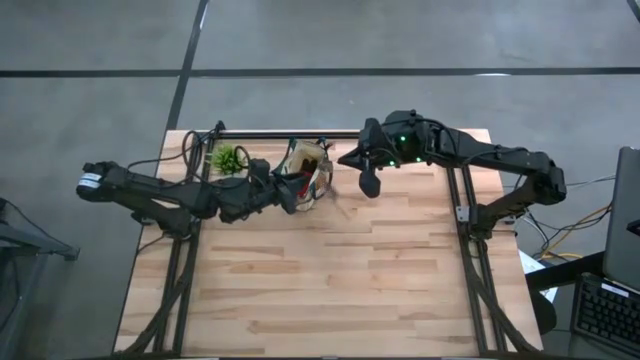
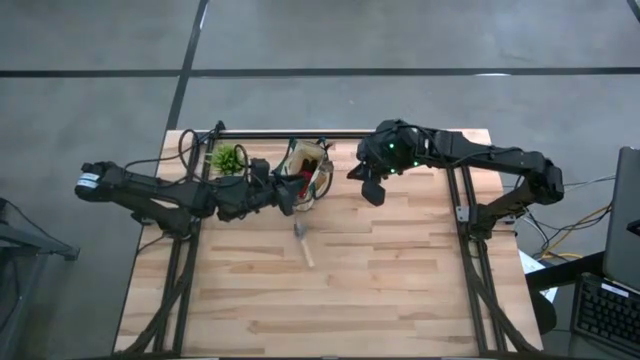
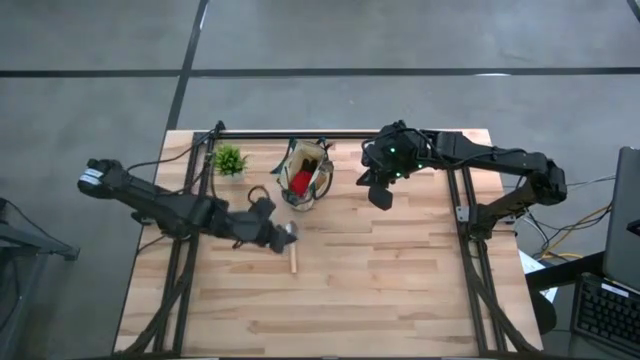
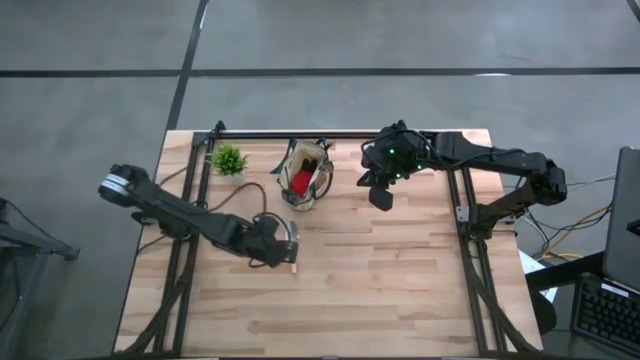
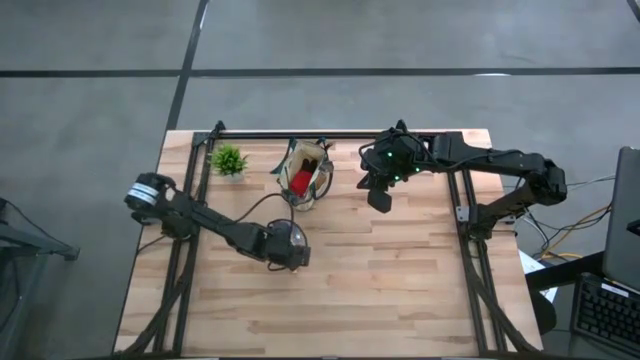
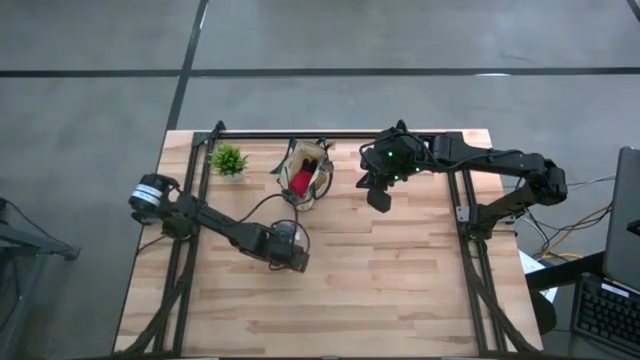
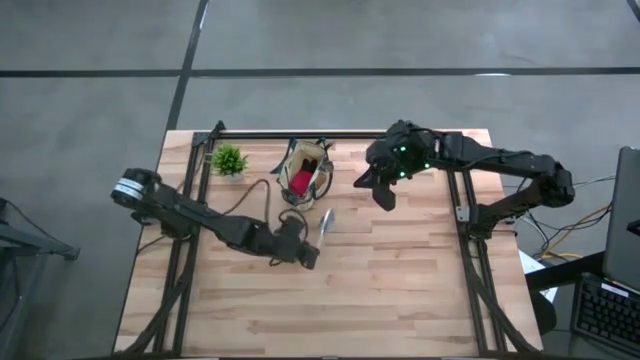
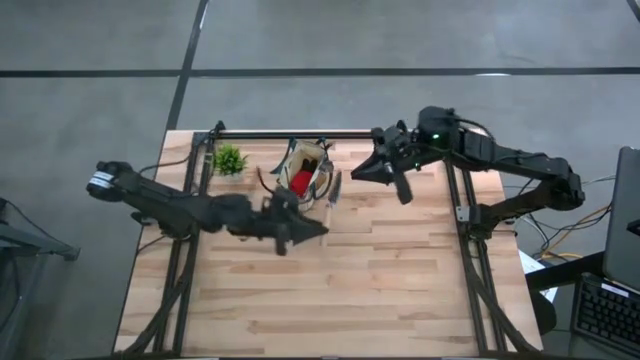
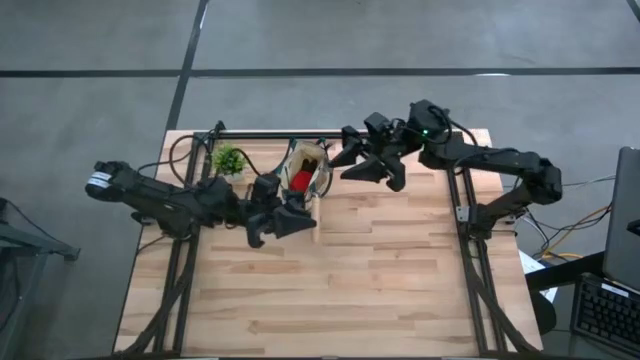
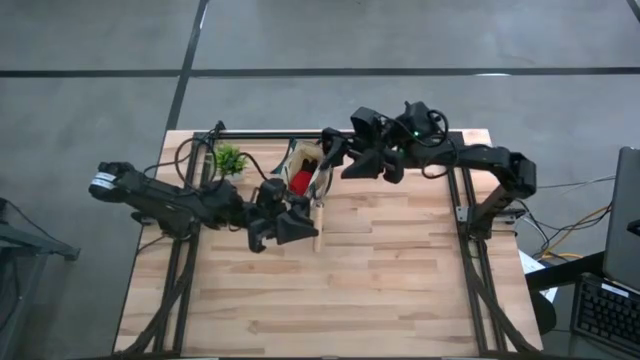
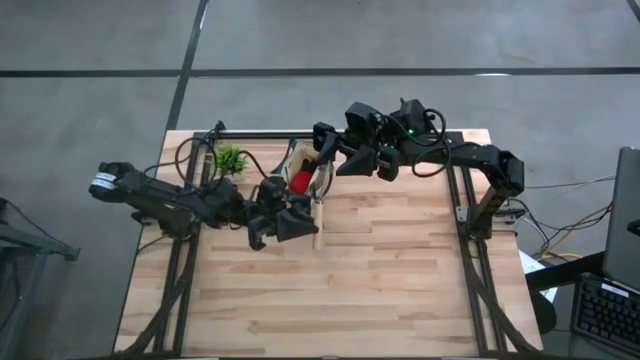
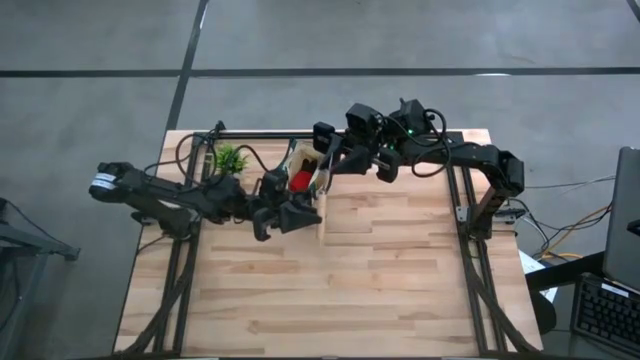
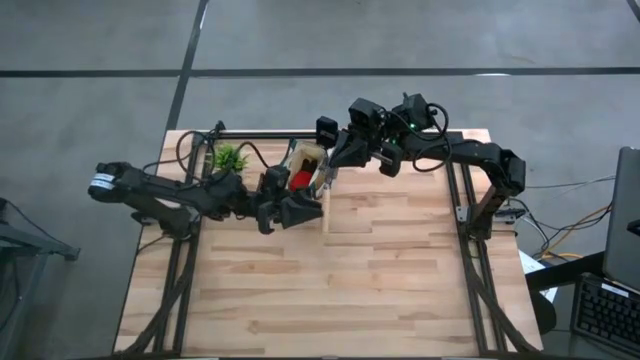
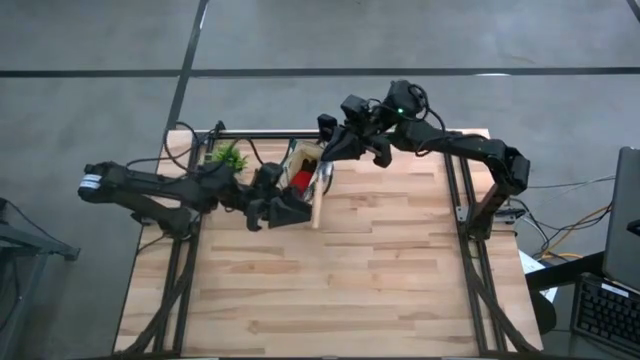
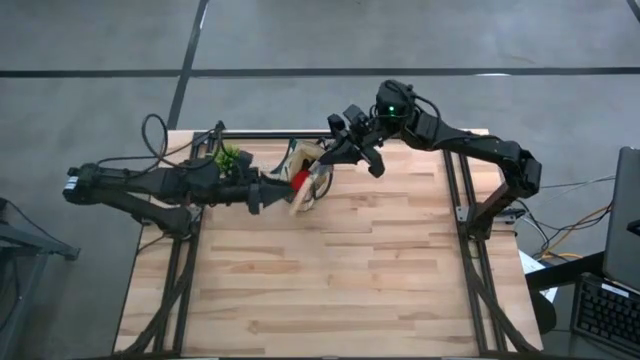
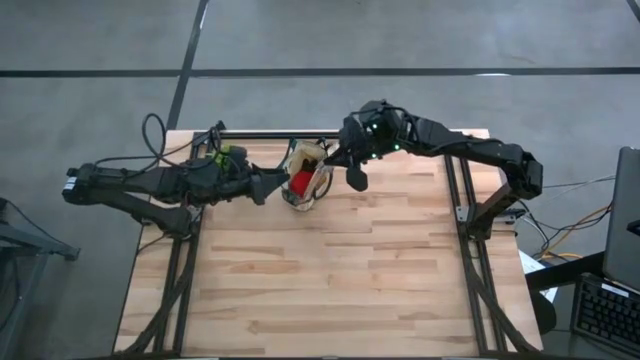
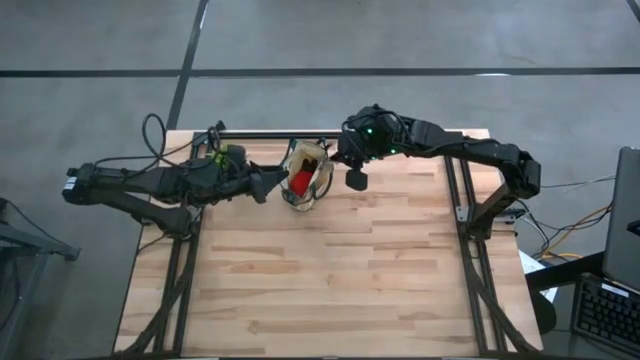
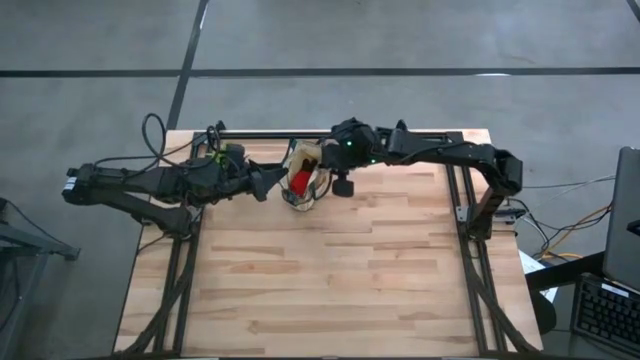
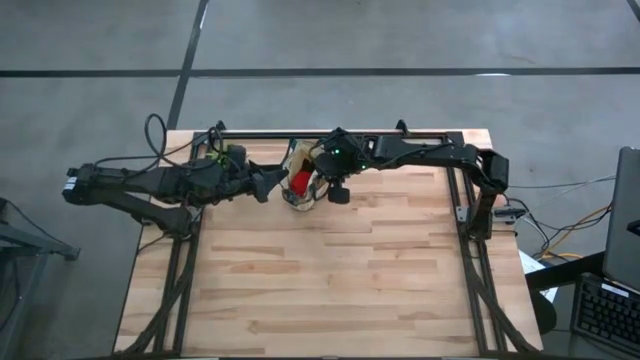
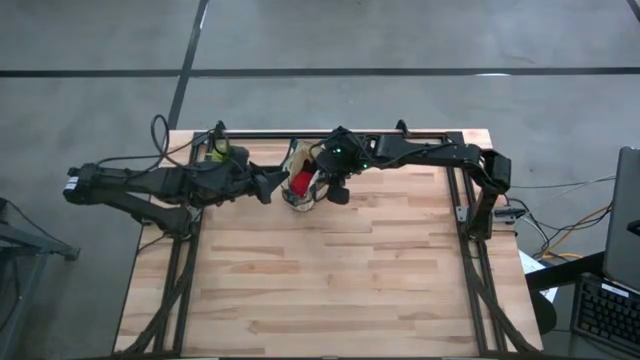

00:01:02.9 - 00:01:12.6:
Task: Pick & Place Garden tools in Gardening bag
Put the brown trowel into the green gardening bag

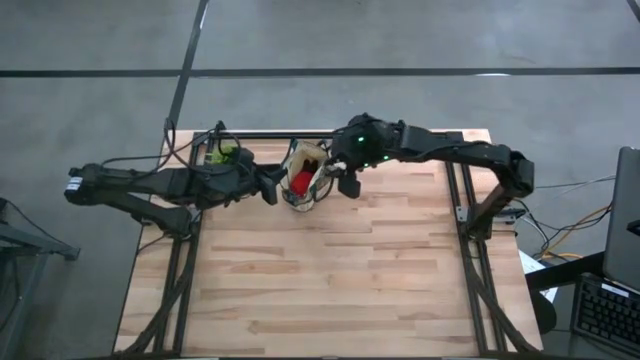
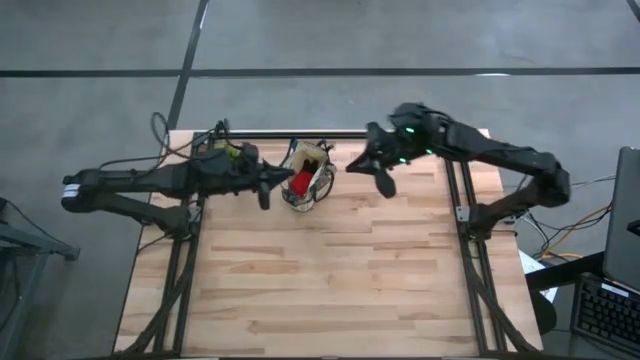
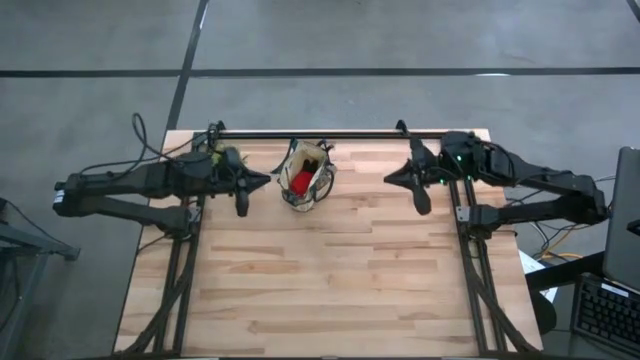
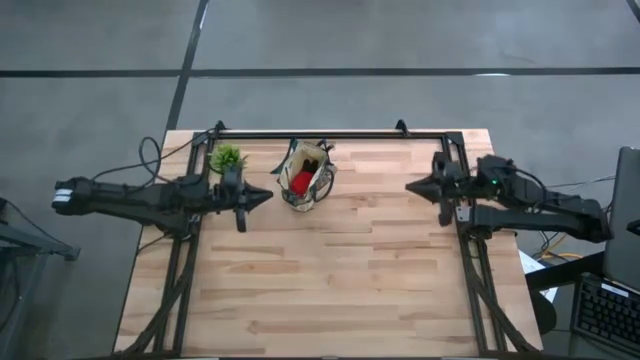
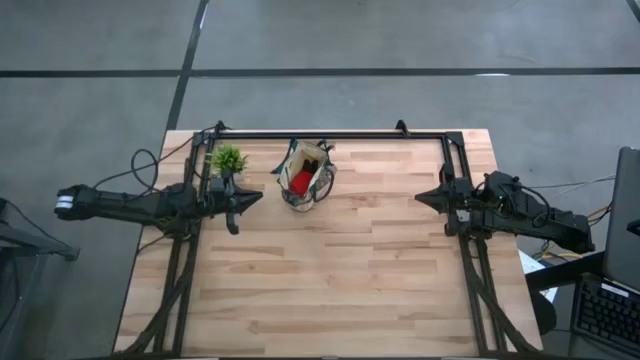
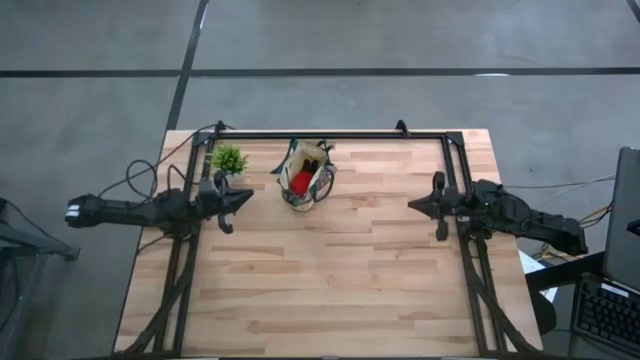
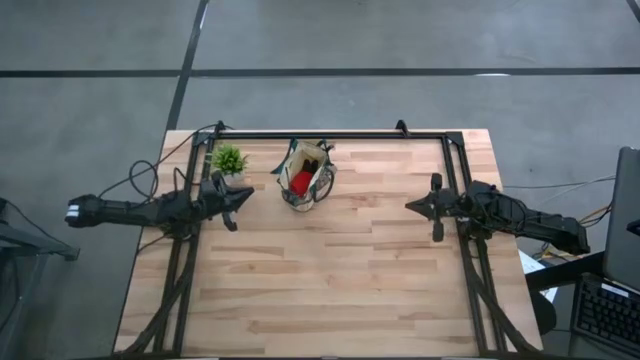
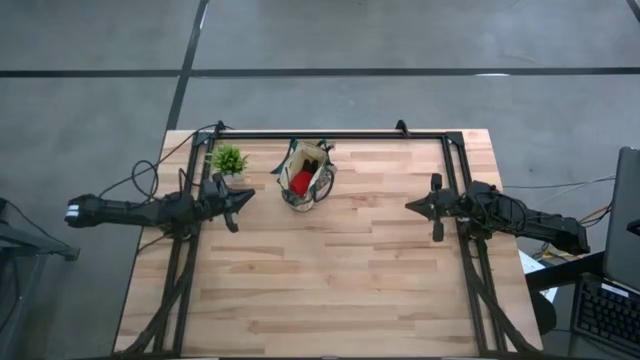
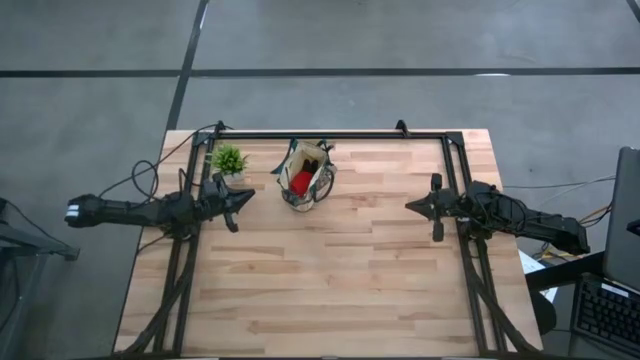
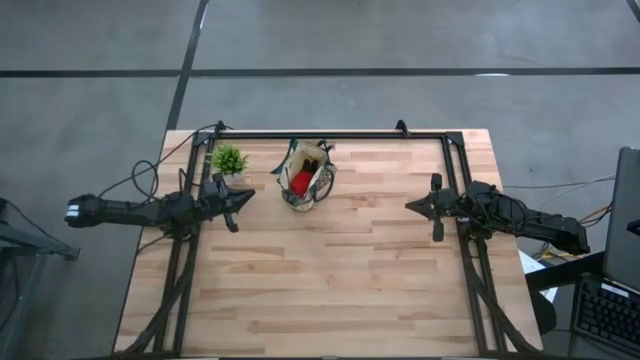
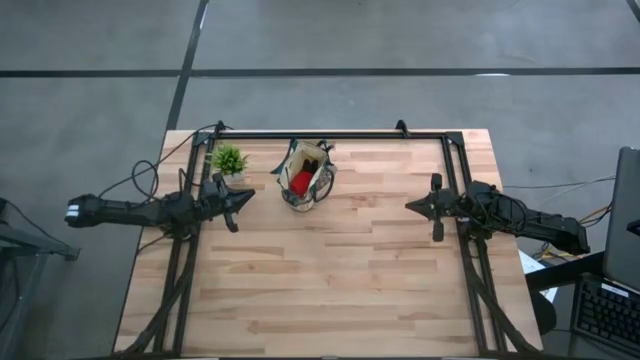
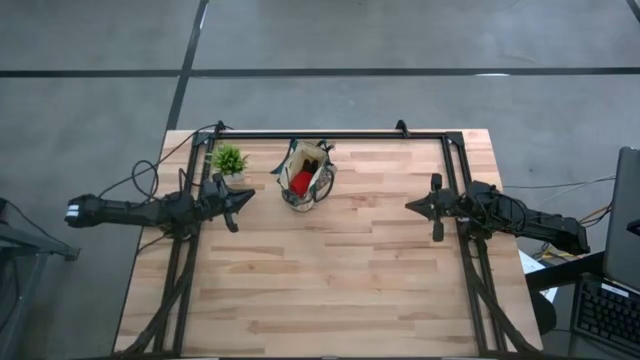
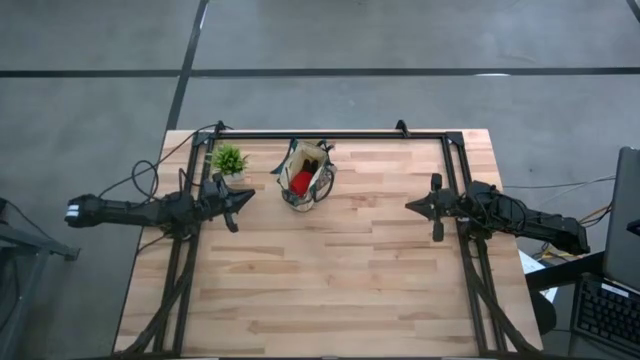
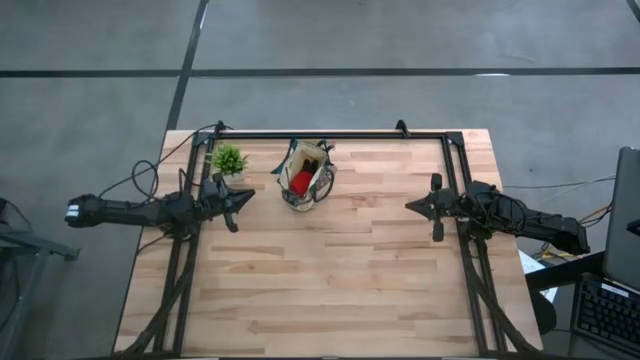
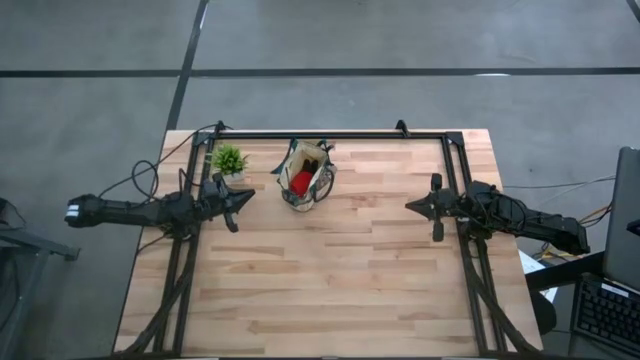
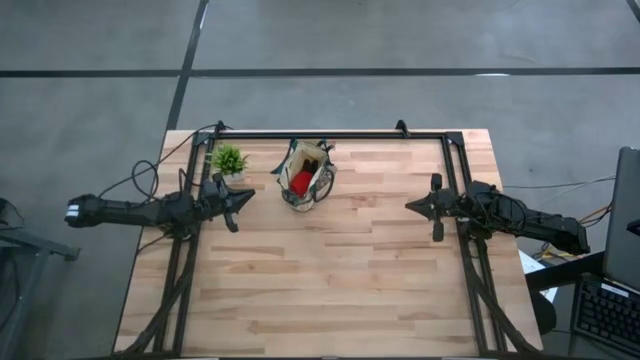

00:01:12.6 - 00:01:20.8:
Return to Home Position

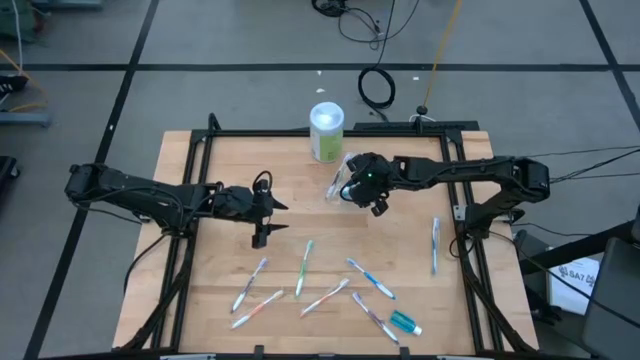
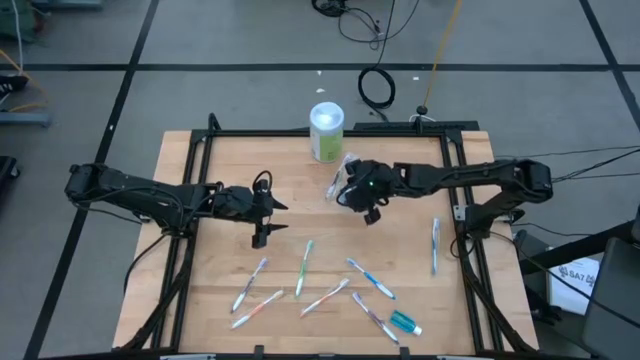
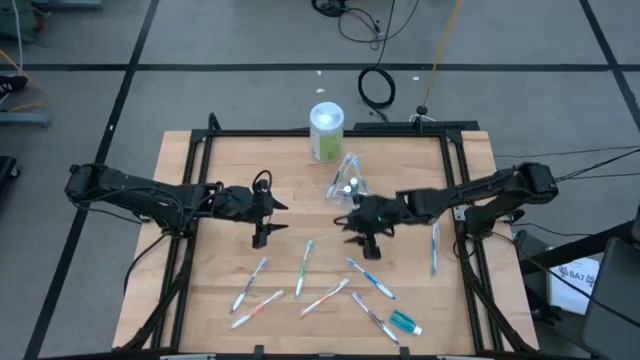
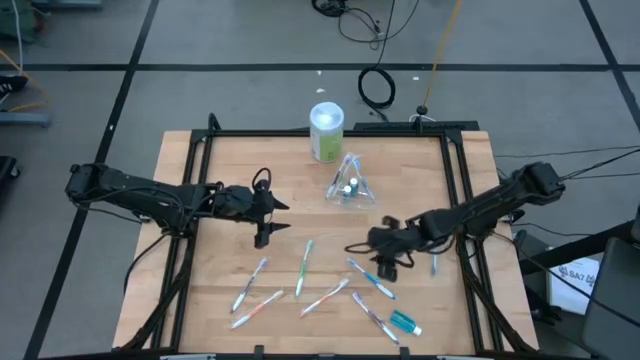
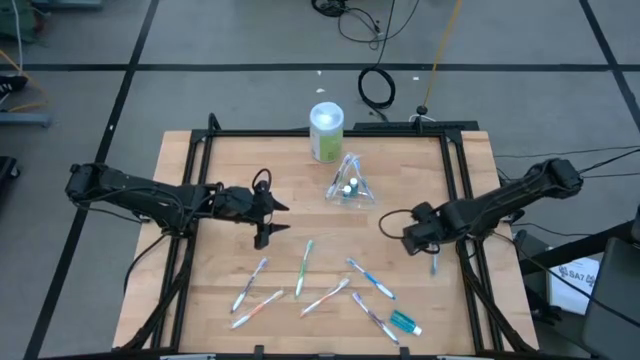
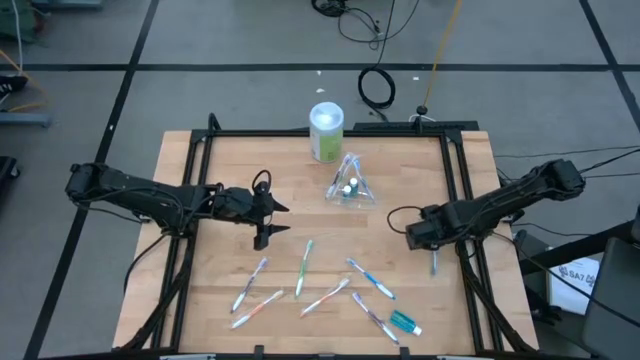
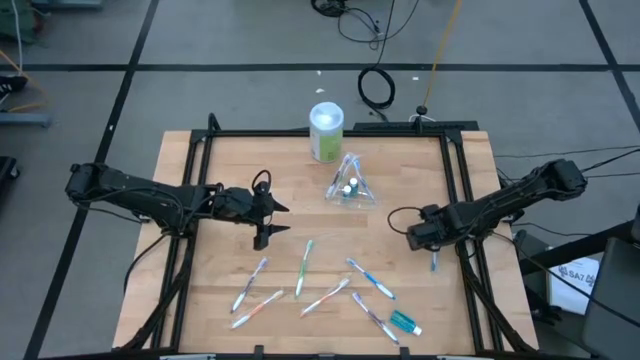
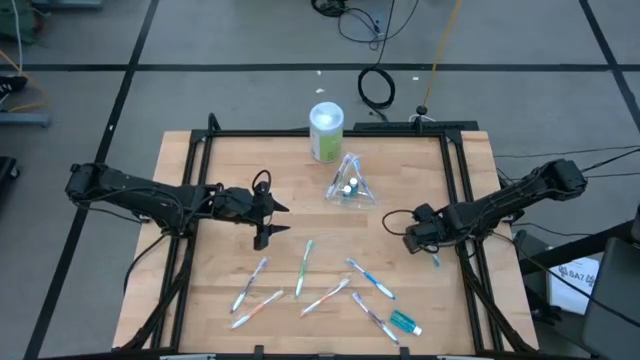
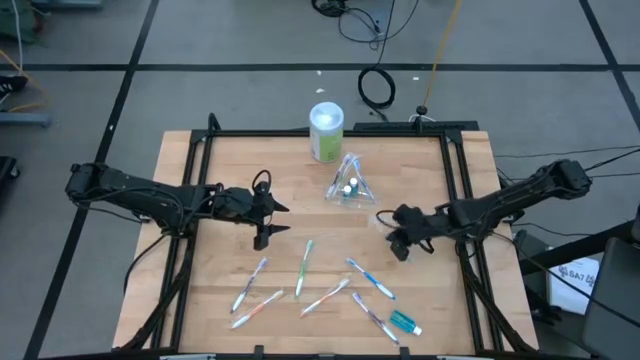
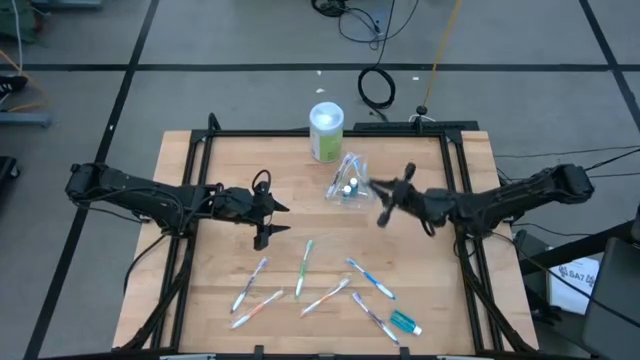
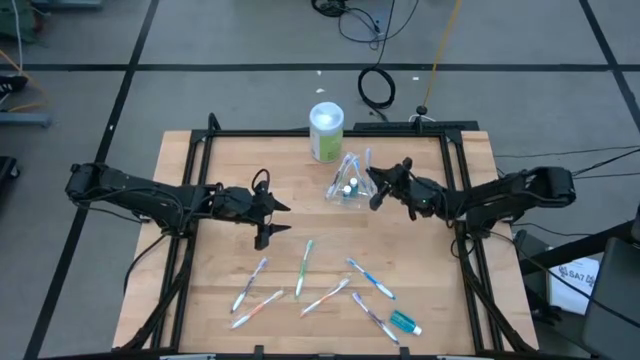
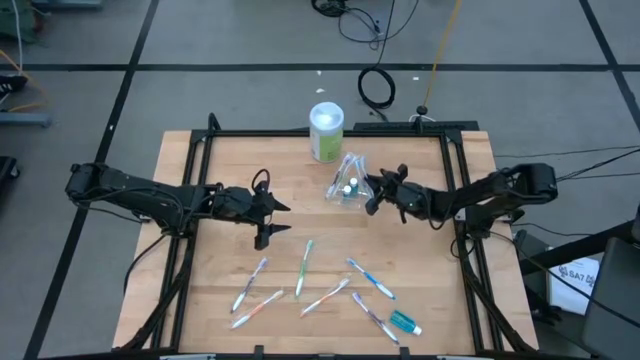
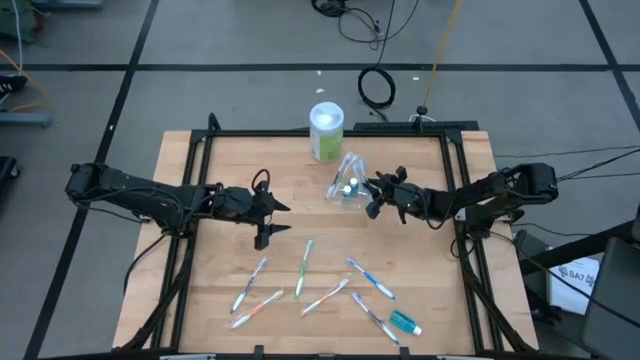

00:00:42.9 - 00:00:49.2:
Task: Pick & Place toothbrushing station
Put the right blue toothbrush into the transparent organizer
